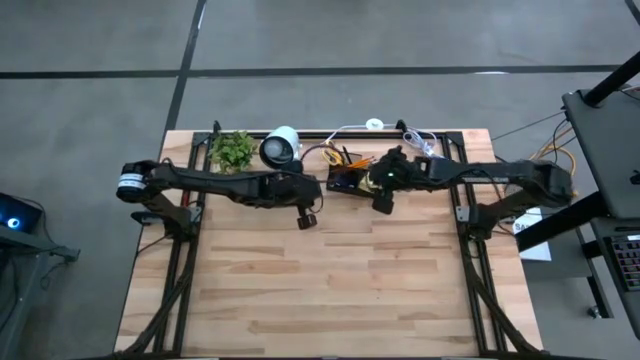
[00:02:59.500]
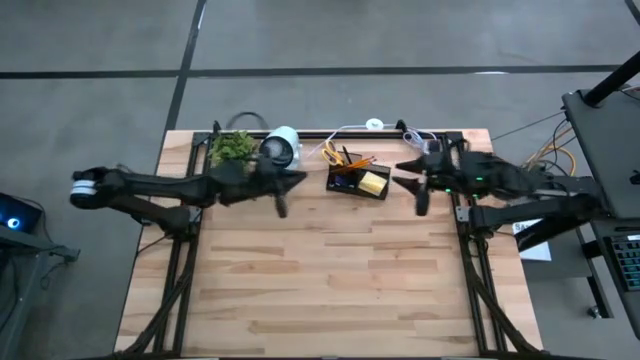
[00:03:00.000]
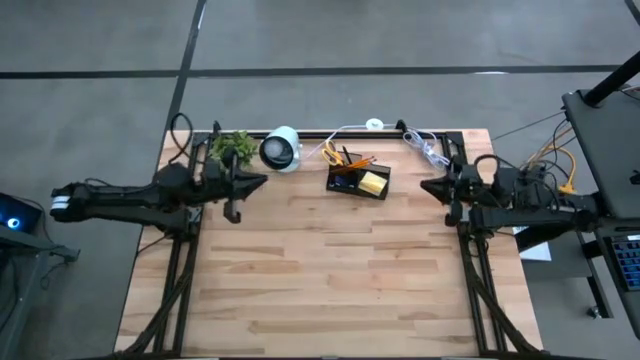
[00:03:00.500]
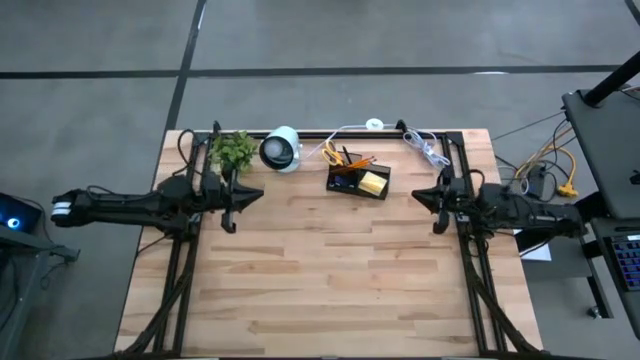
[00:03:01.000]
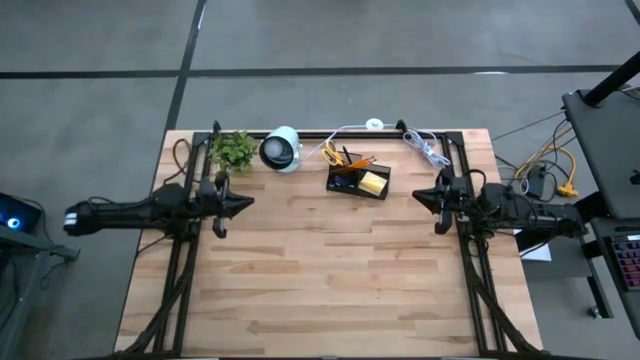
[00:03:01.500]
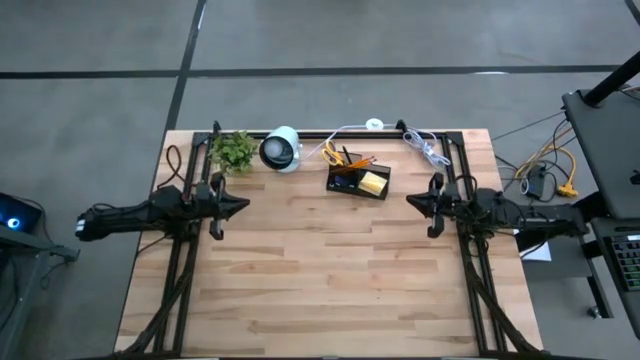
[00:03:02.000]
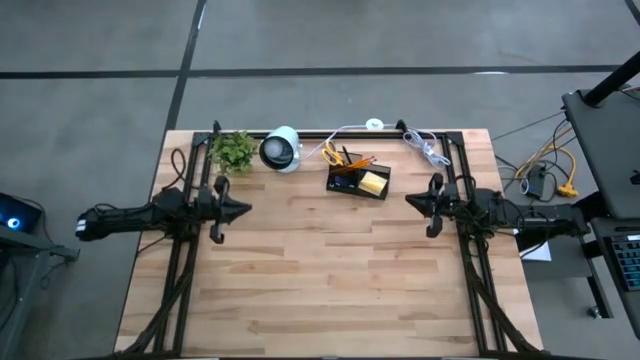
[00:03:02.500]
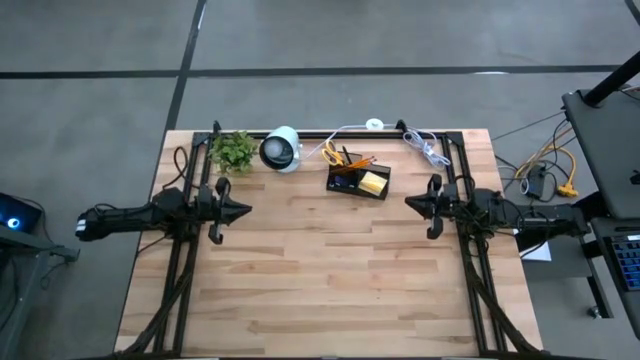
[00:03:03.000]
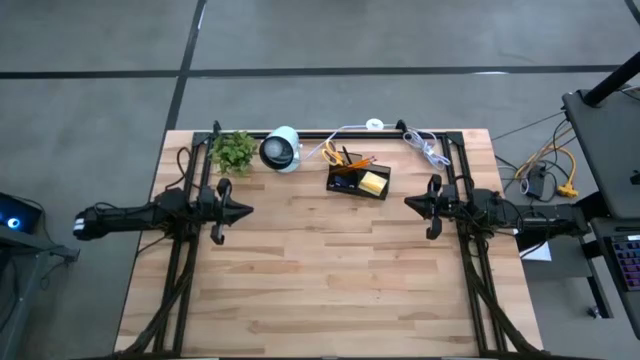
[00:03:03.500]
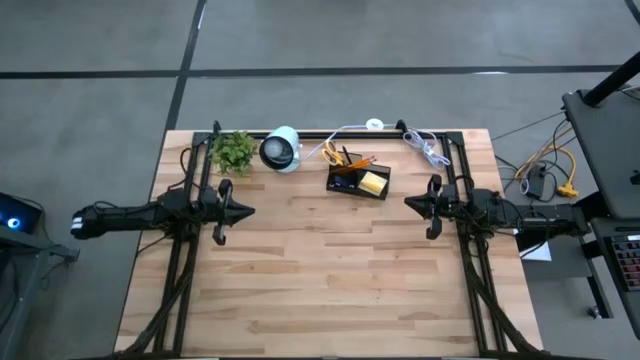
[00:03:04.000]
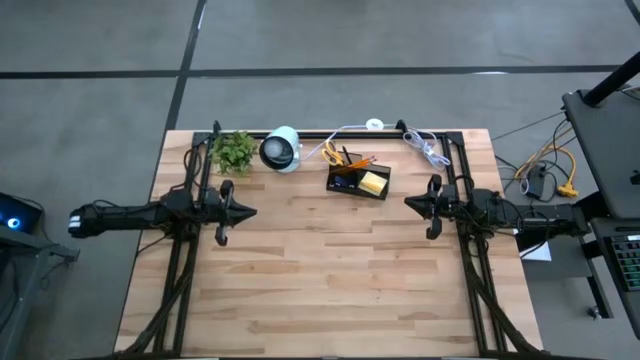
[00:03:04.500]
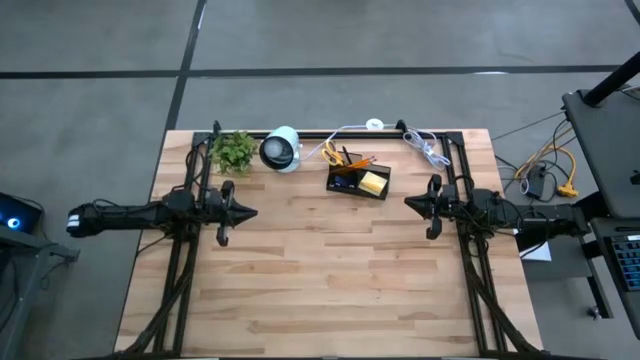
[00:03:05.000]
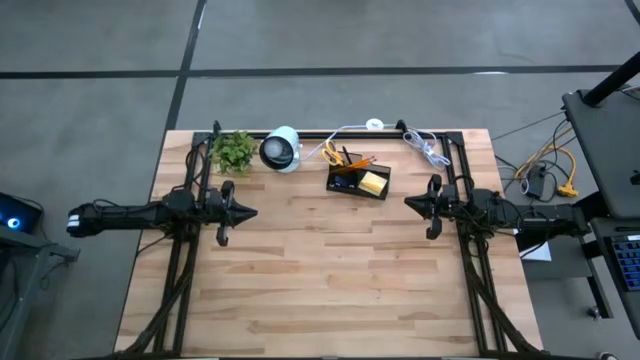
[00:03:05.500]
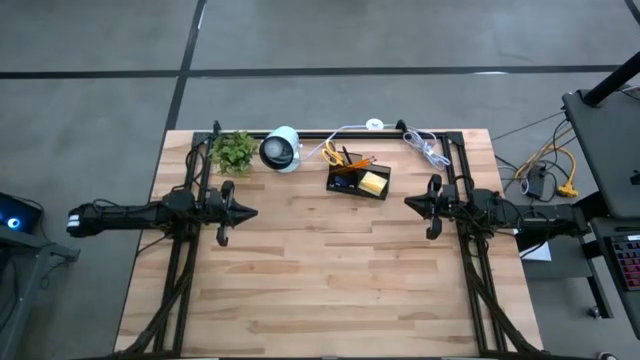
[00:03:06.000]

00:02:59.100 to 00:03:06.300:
Task: Pick and place office supplies into organizer
Return to Home Position

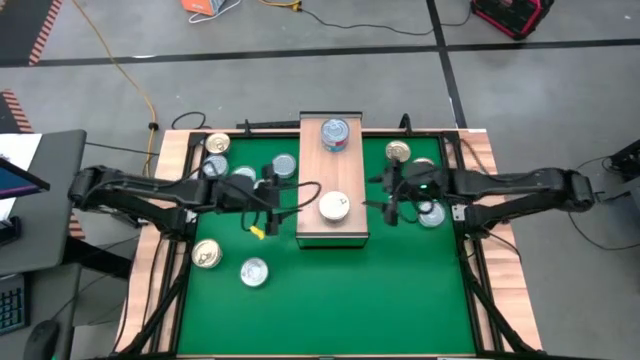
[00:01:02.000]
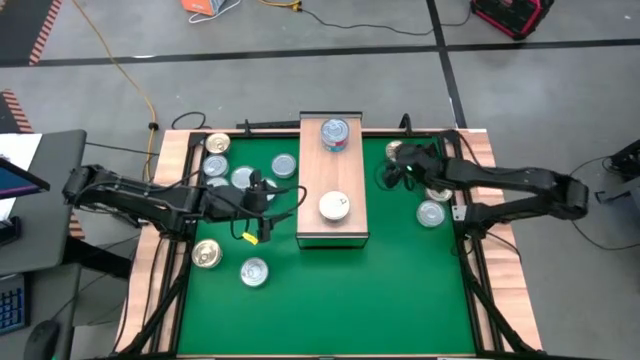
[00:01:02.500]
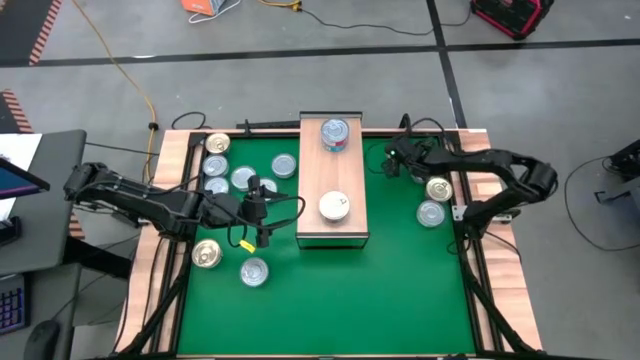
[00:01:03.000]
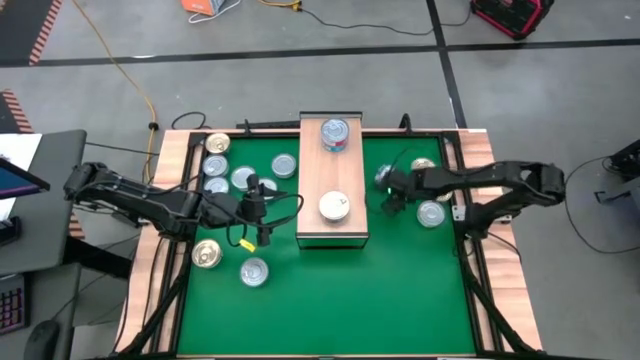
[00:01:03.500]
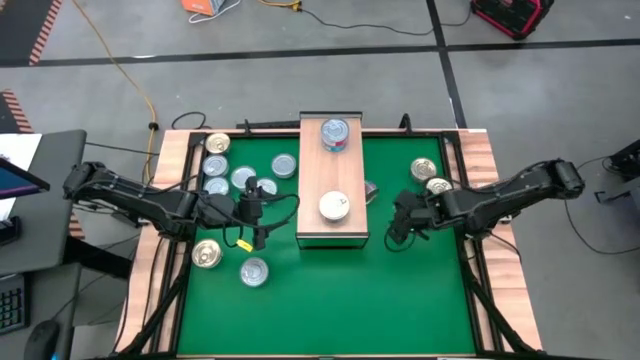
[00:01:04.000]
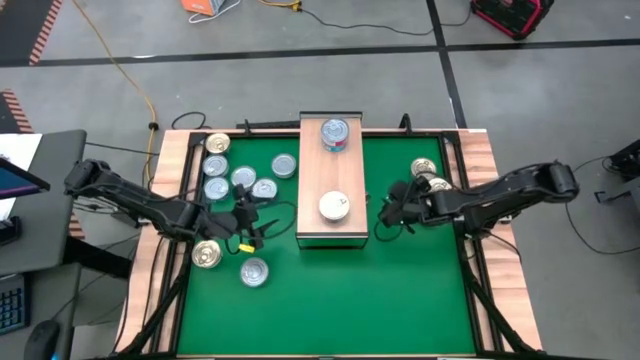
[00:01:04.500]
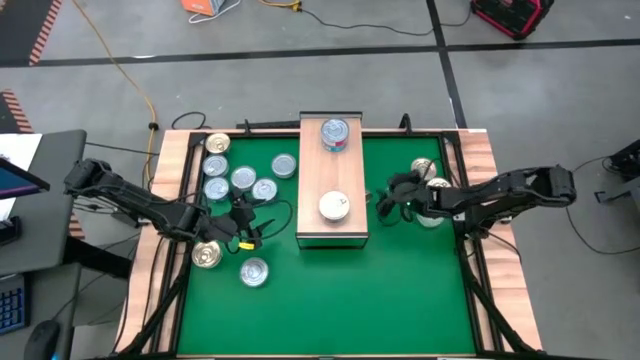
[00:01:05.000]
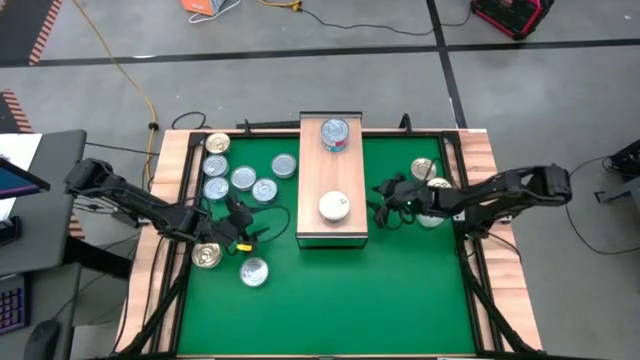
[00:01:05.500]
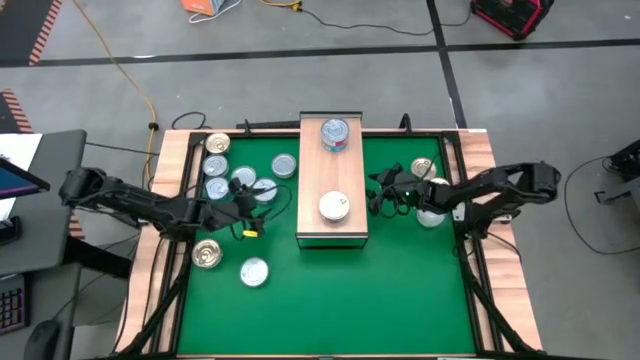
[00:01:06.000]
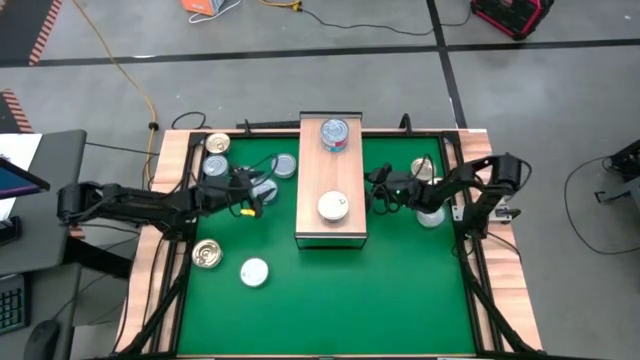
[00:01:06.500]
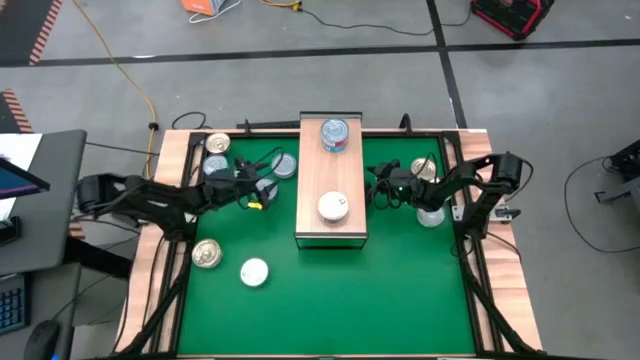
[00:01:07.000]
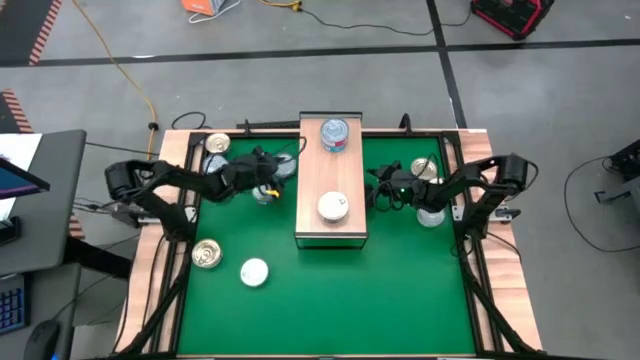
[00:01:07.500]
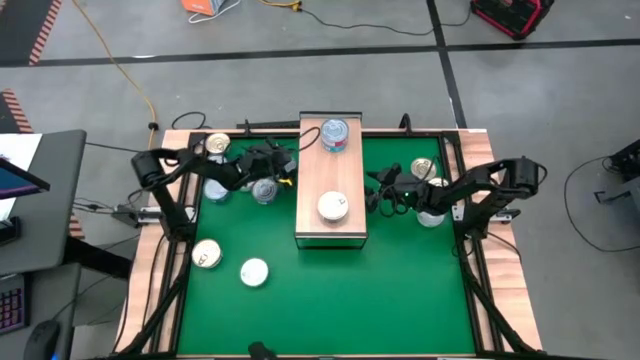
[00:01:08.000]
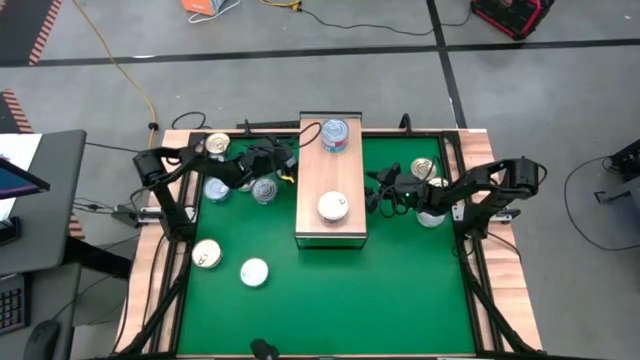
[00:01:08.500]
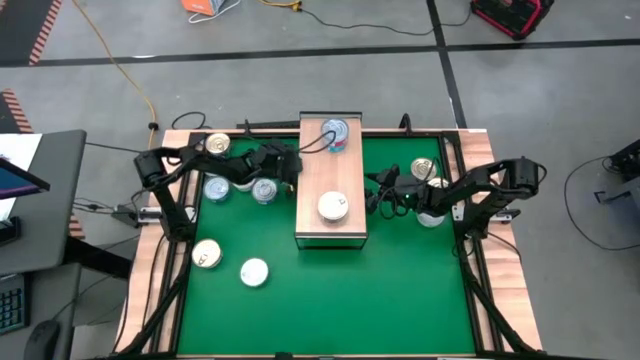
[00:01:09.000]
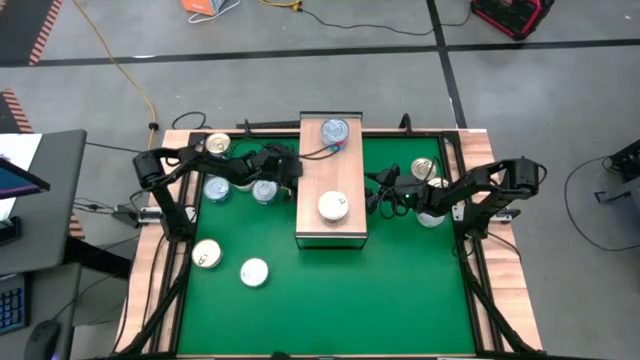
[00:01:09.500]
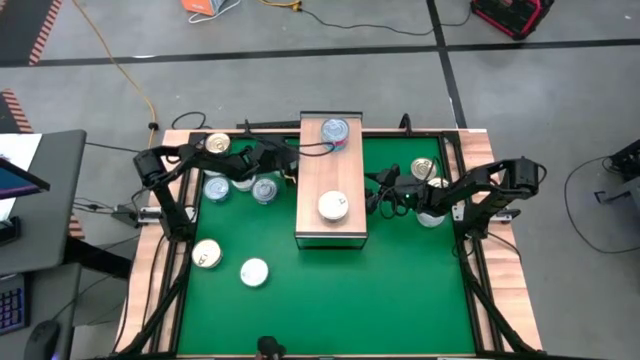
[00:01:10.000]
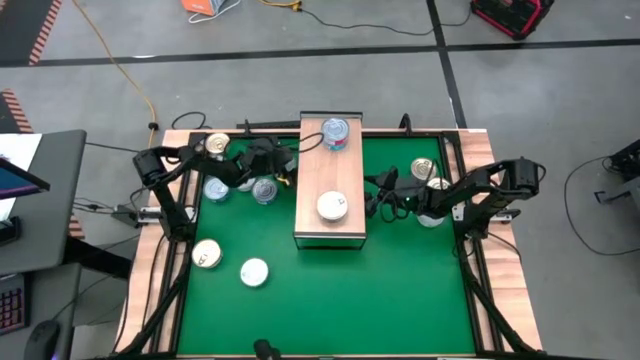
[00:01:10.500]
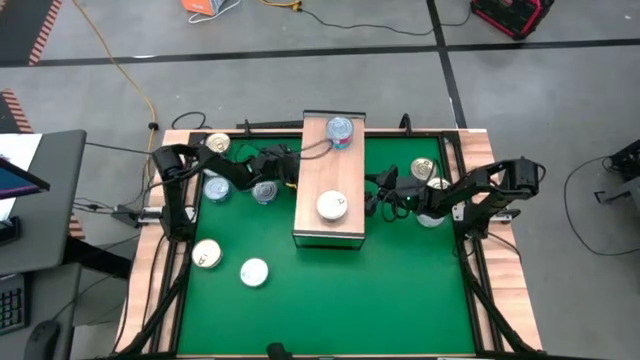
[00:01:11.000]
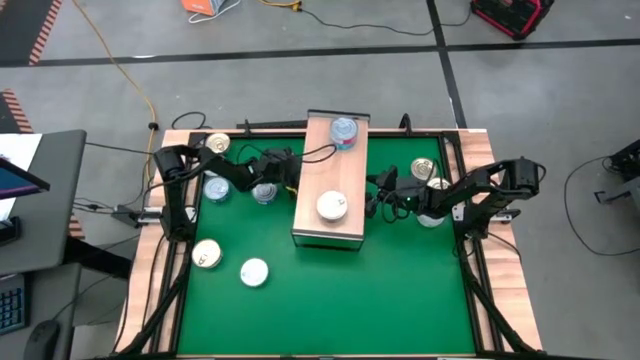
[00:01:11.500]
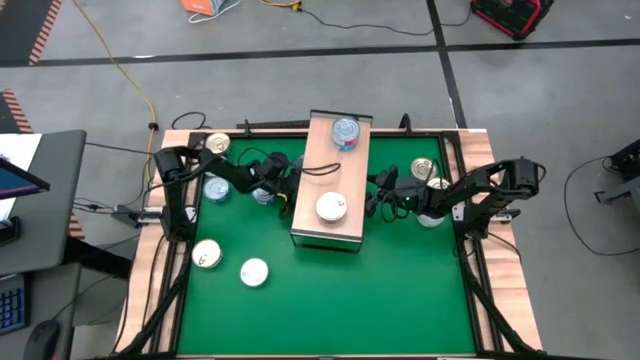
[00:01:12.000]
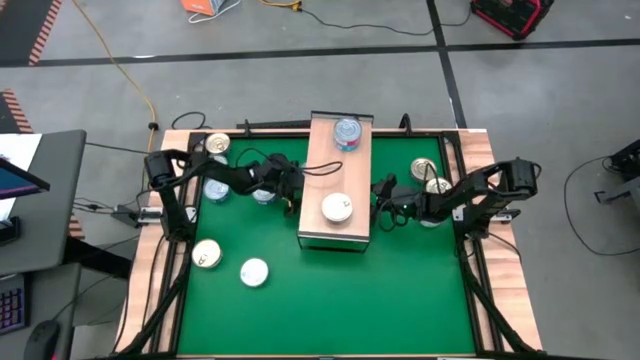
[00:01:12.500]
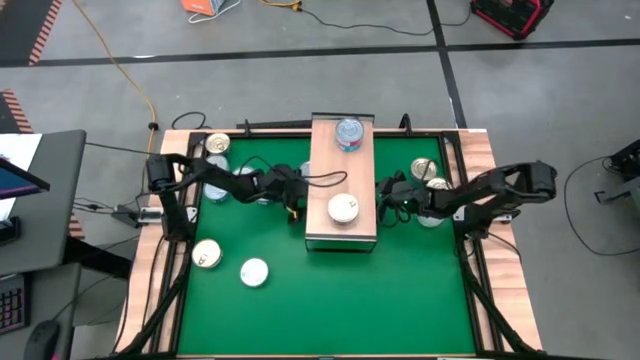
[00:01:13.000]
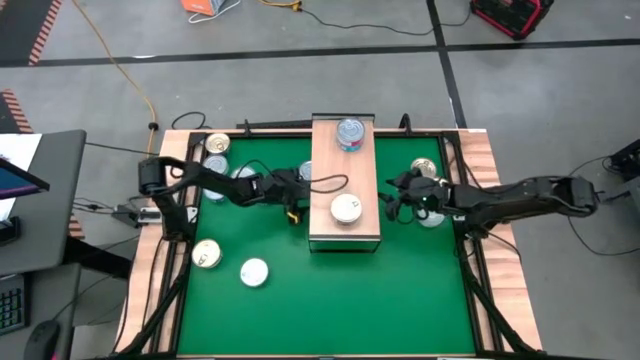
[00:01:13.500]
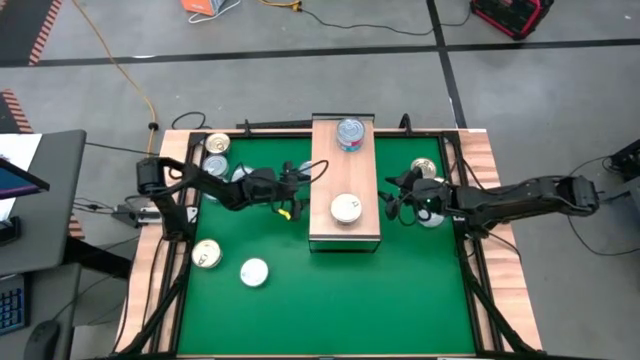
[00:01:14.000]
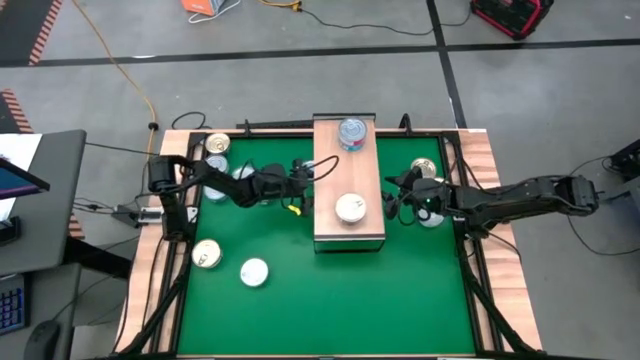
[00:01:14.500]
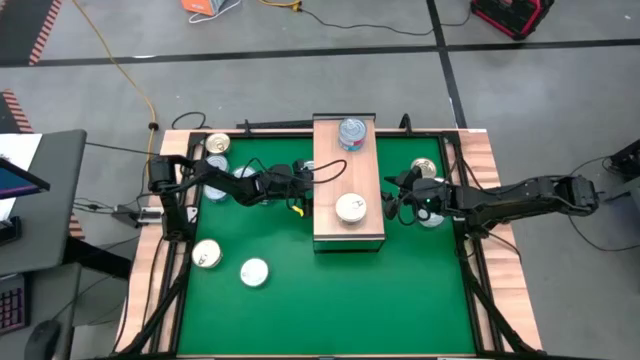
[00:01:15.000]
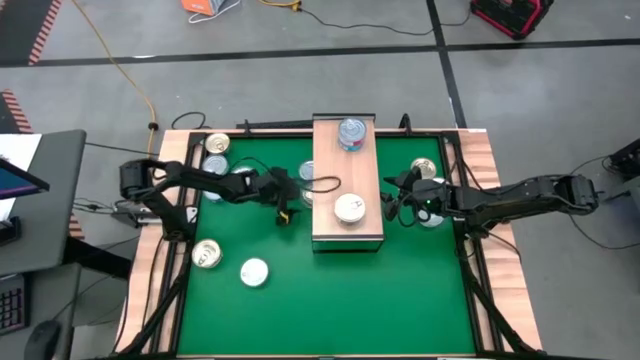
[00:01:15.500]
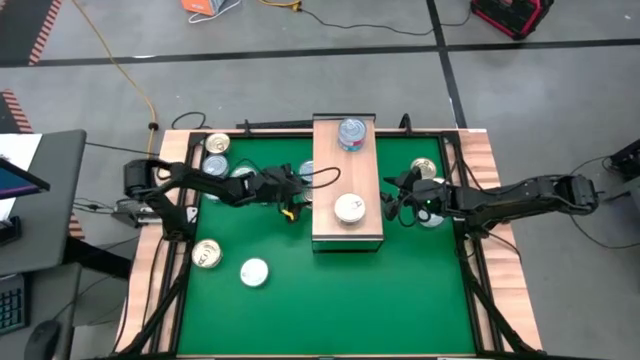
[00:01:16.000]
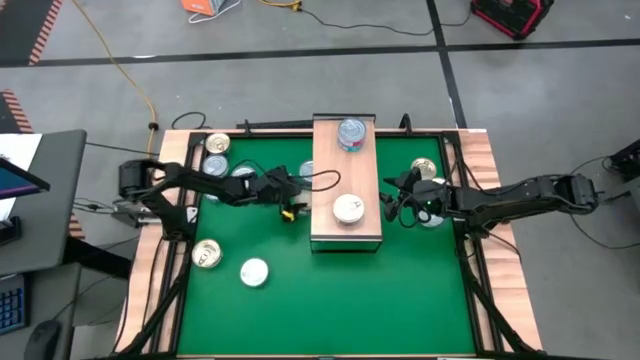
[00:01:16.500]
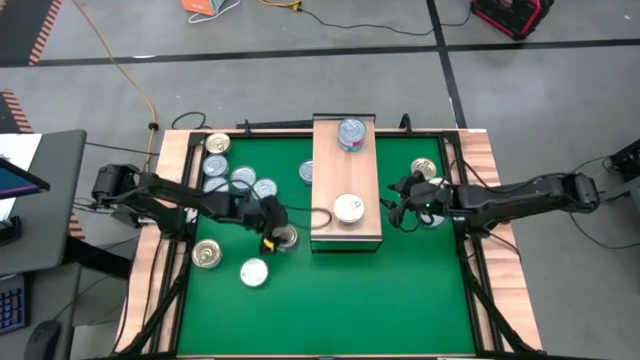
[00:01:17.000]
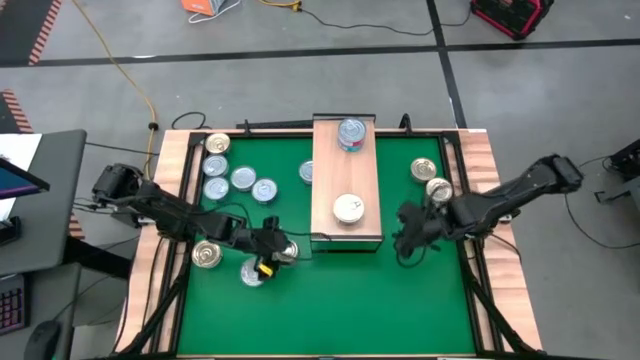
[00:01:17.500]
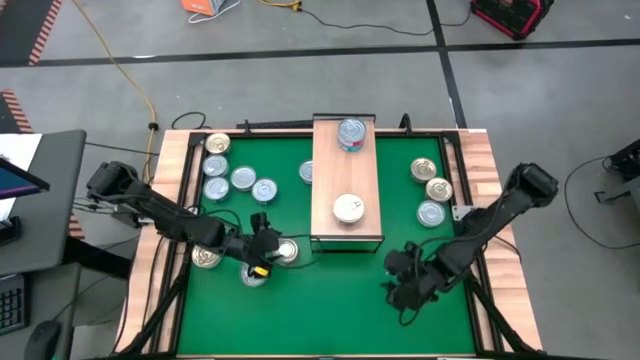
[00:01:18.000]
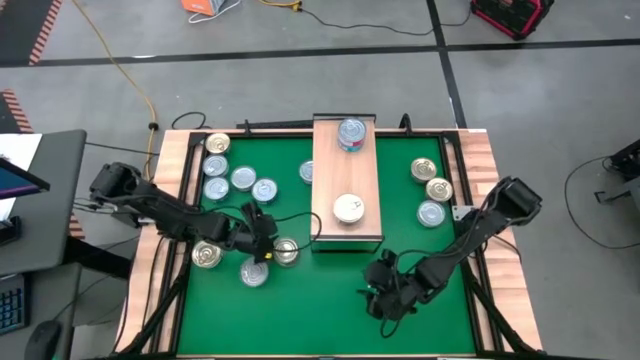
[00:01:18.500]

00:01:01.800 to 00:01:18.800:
Task: Stack canned seafood by type on shelf
Stack the blue tuna can on top of the blue tuna can on the shelf
